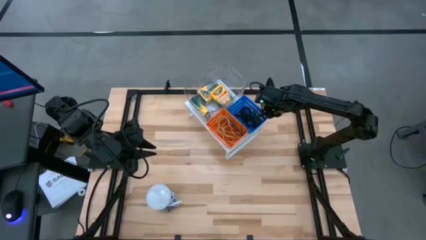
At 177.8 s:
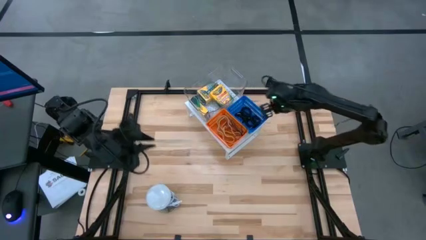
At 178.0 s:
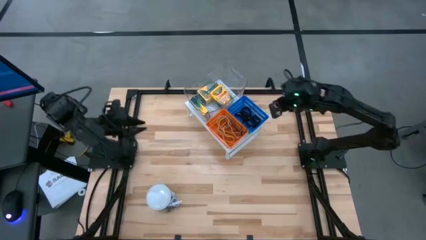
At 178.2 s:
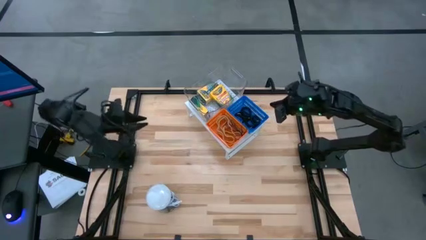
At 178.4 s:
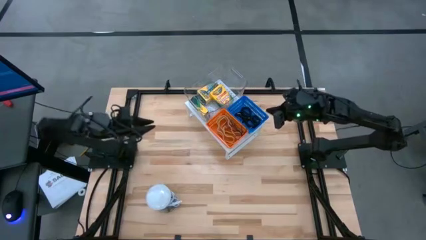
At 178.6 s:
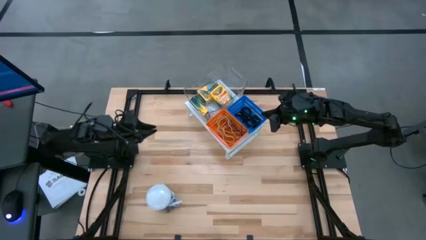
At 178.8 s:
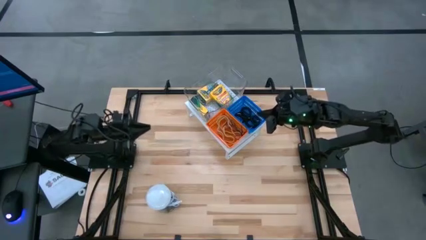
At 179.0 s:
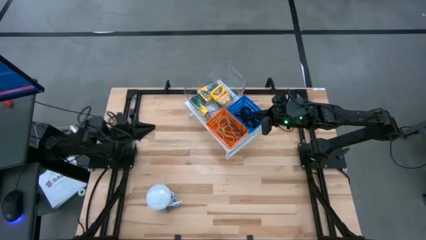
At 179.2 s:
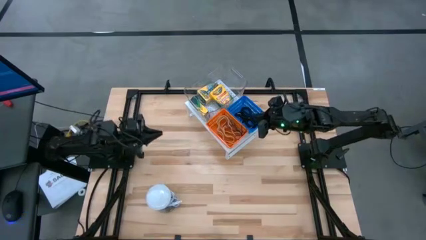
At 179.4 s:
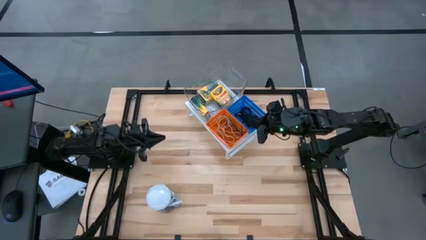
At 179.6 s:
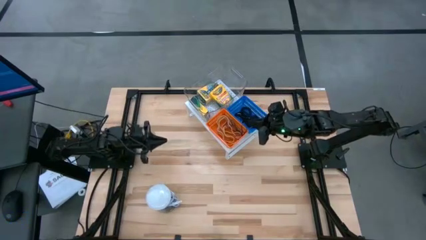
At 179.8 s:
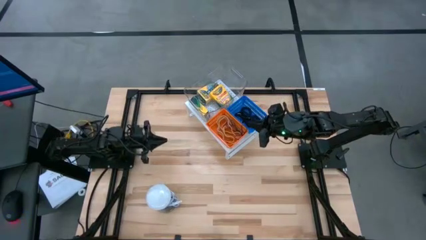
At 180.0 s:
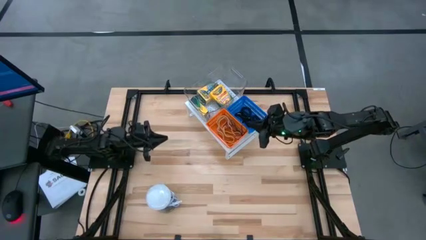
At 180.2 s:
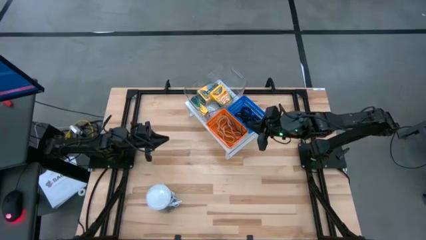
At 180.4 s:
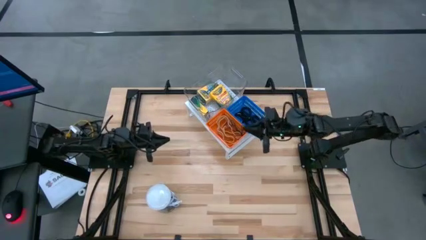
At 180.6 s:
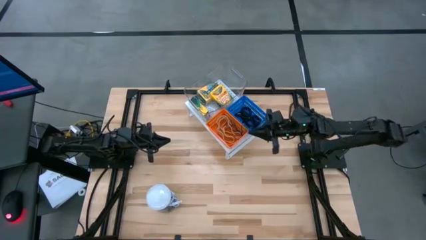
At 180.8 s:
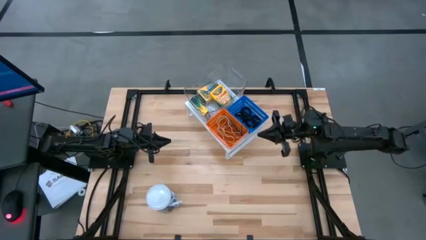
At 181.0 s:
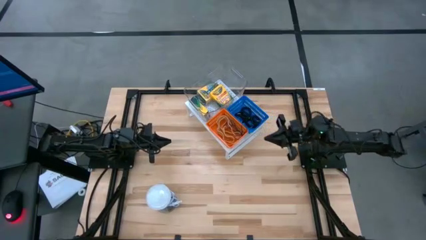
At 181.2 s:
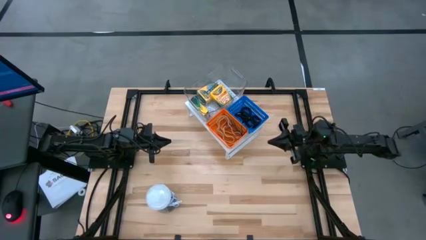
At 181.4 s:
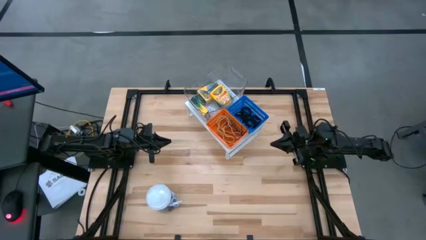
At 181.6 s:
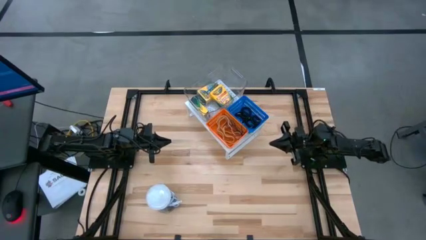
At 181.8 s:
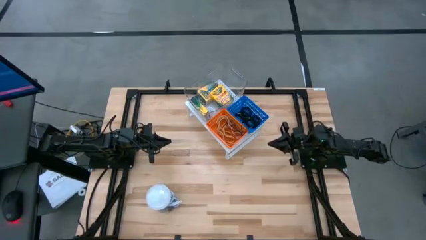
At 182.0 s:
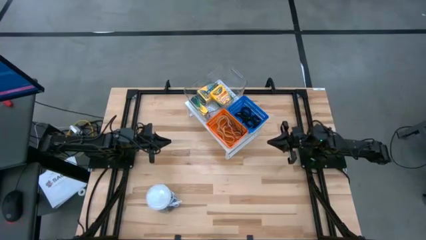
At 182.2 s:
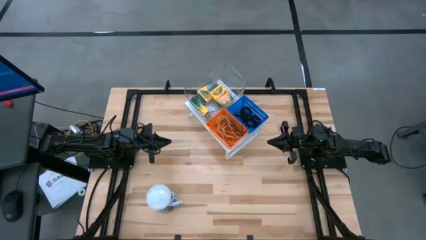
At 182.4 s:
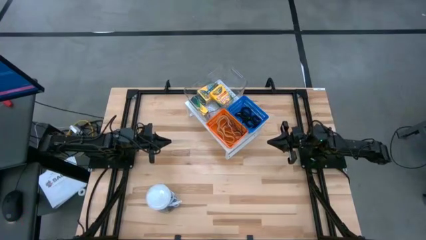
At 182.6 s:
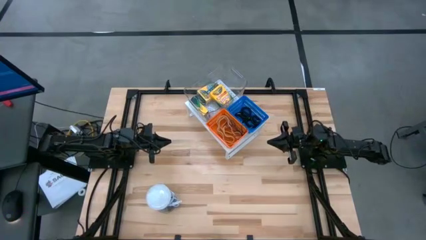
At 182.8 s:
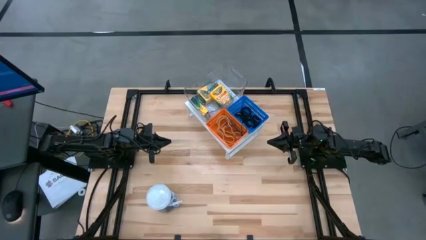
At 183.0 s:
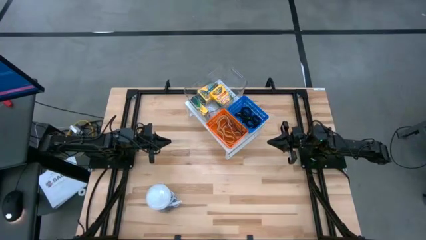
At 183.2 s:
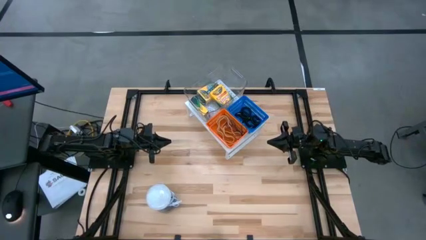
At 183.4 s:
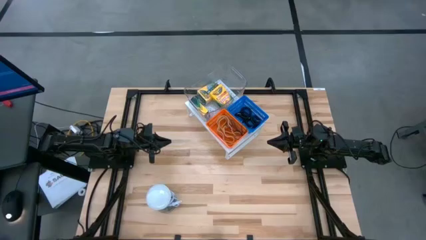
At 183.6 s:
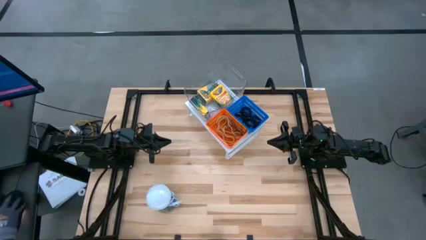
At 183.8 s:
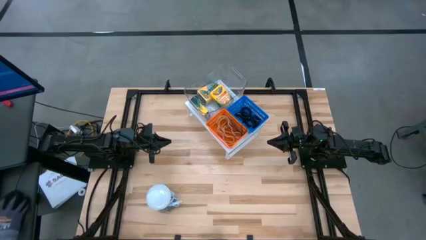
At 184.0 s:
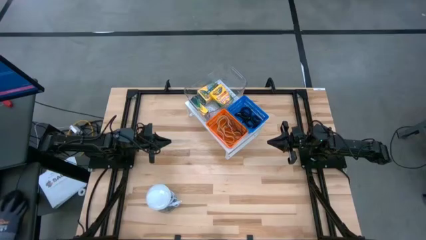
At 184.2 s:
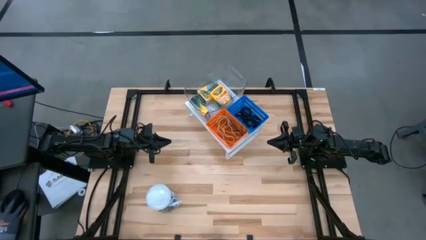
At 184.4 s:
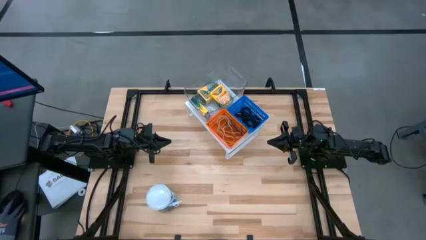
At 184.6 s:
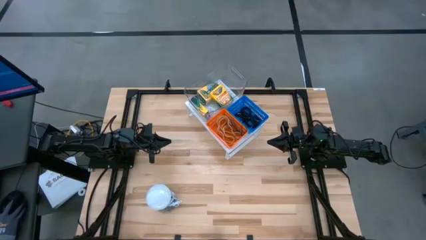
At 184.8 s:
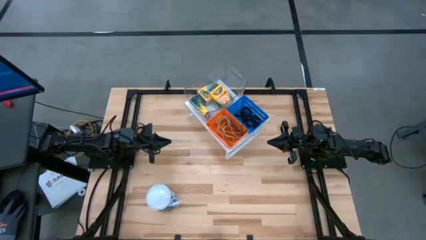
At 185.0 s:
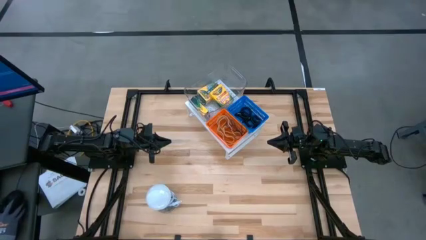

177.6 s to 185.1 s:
Task: Pick & Place Office Desk Supplies
Return to Home Position

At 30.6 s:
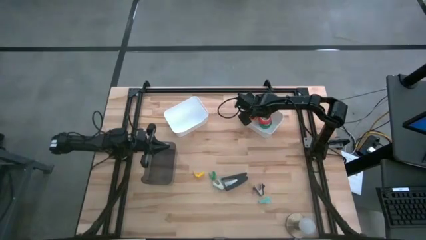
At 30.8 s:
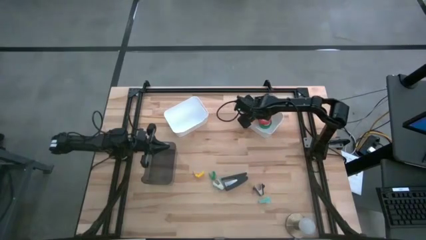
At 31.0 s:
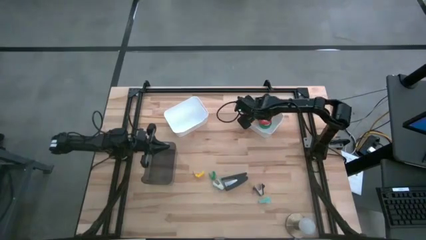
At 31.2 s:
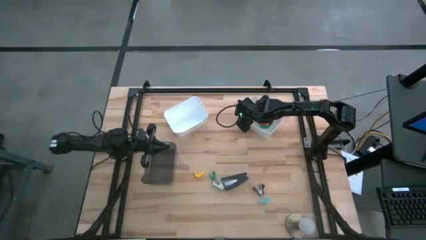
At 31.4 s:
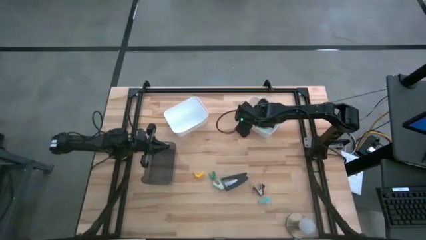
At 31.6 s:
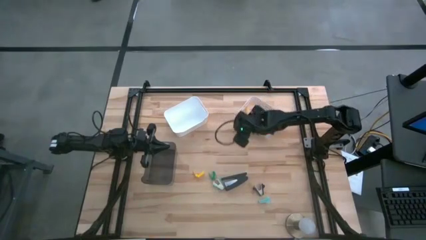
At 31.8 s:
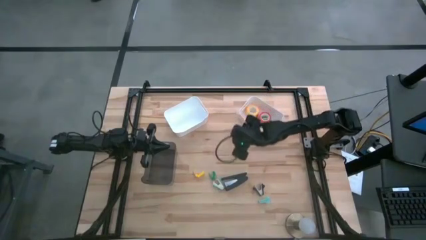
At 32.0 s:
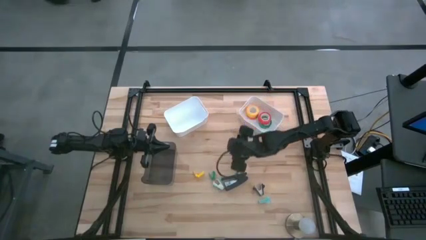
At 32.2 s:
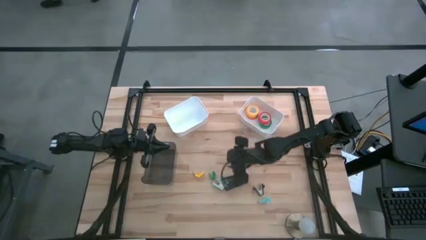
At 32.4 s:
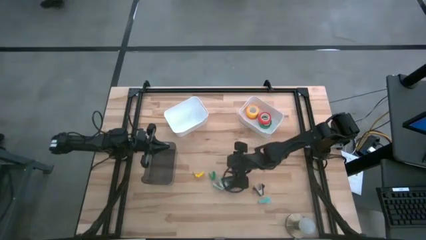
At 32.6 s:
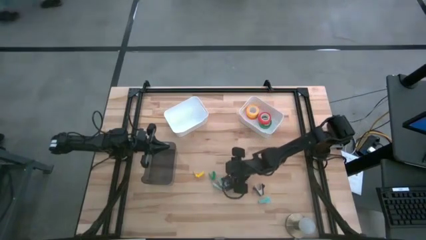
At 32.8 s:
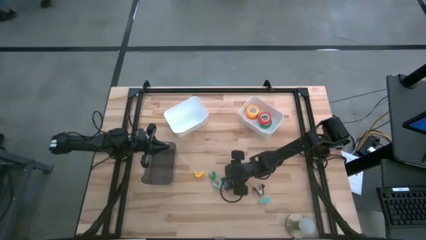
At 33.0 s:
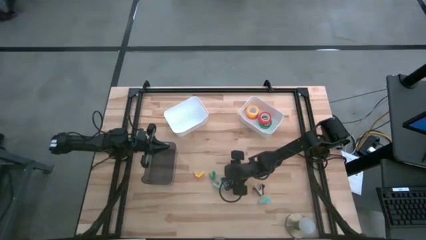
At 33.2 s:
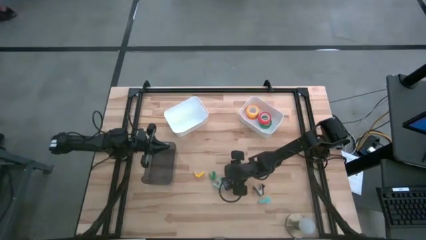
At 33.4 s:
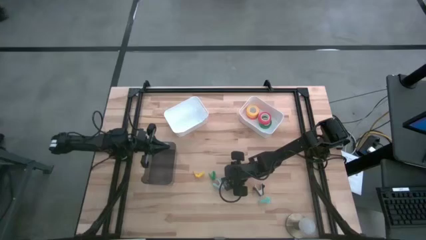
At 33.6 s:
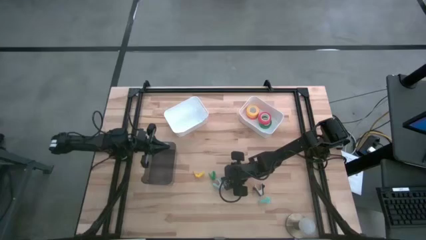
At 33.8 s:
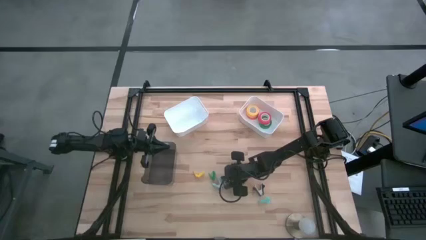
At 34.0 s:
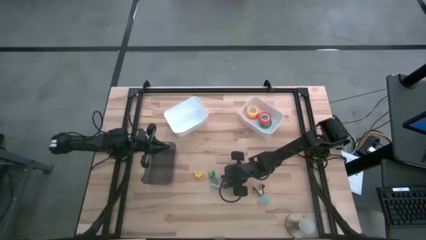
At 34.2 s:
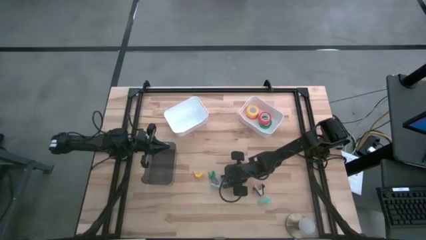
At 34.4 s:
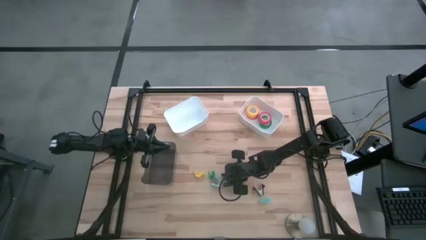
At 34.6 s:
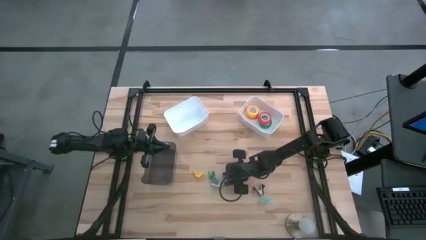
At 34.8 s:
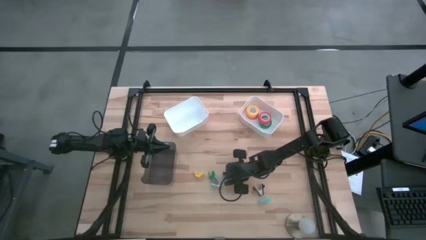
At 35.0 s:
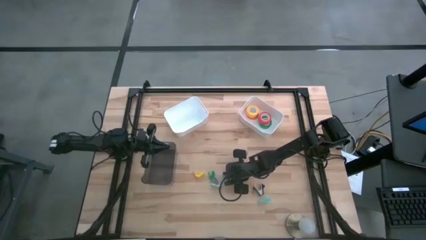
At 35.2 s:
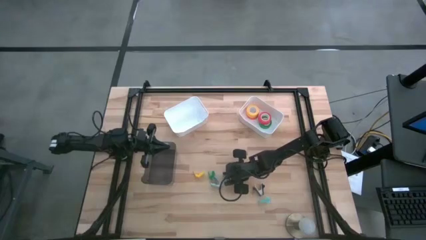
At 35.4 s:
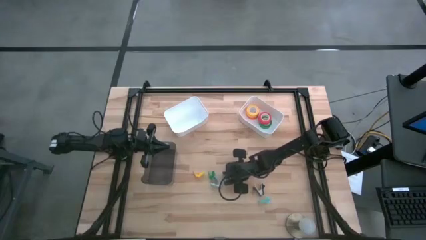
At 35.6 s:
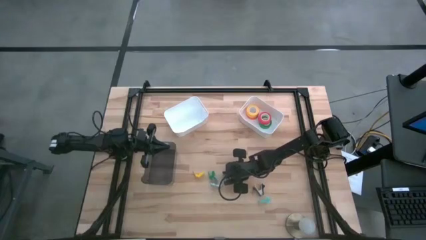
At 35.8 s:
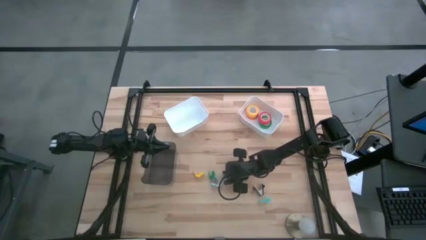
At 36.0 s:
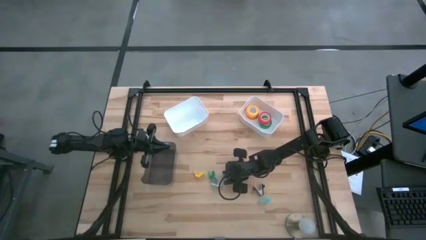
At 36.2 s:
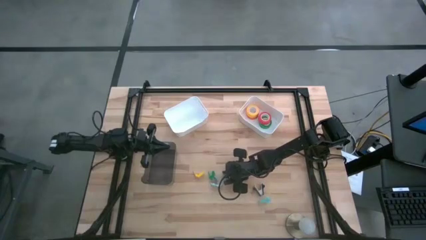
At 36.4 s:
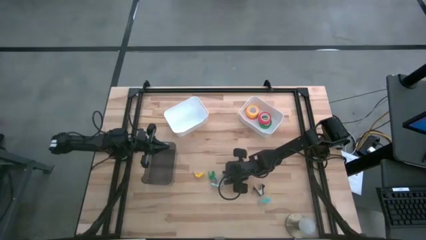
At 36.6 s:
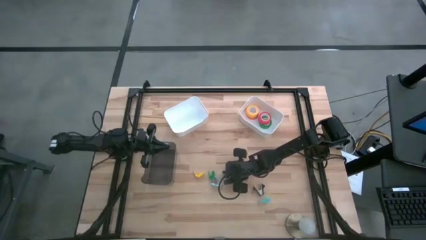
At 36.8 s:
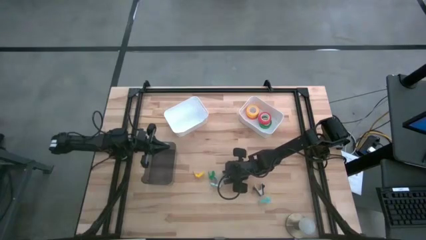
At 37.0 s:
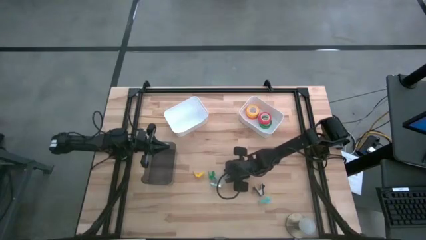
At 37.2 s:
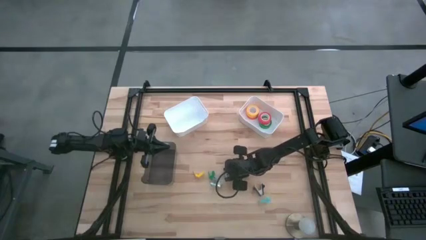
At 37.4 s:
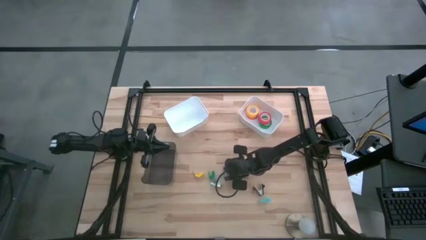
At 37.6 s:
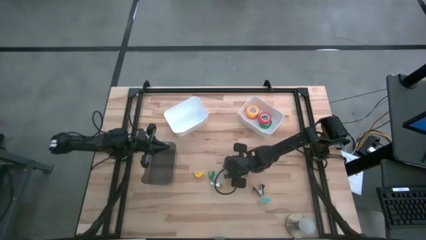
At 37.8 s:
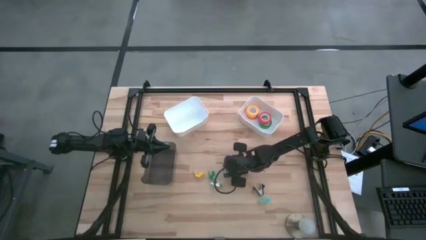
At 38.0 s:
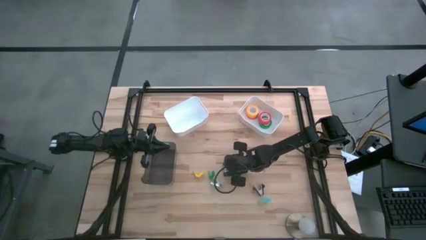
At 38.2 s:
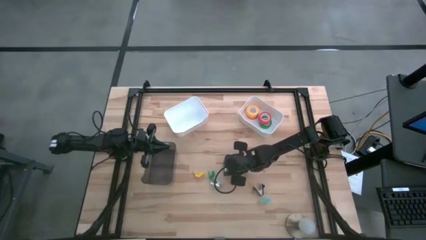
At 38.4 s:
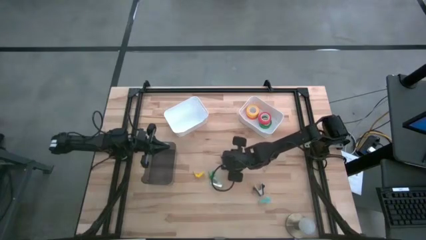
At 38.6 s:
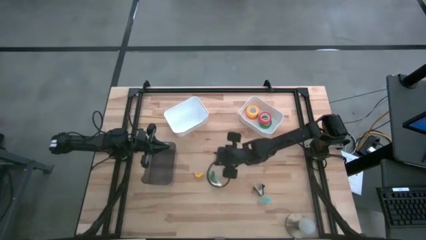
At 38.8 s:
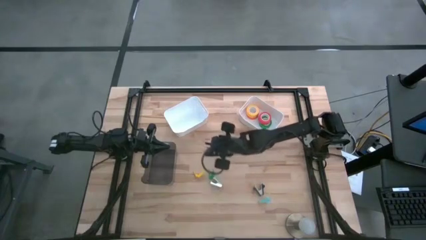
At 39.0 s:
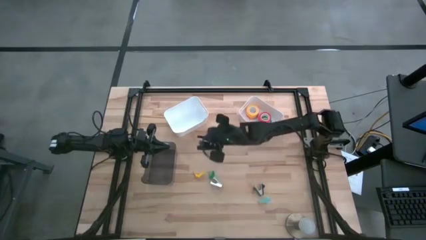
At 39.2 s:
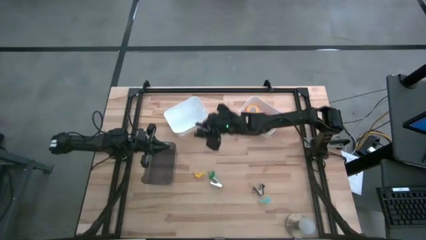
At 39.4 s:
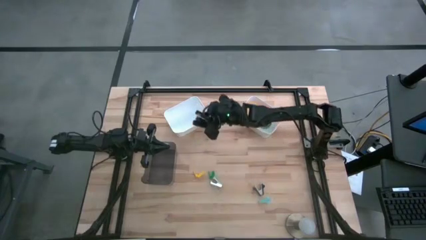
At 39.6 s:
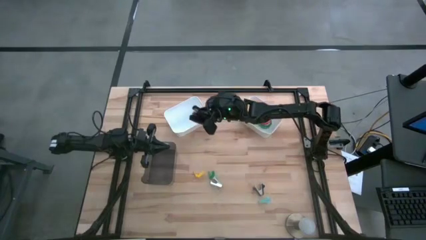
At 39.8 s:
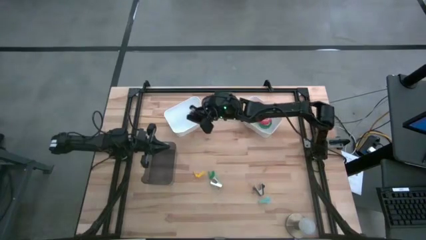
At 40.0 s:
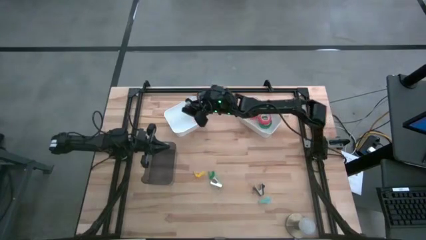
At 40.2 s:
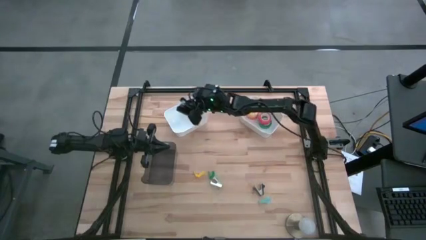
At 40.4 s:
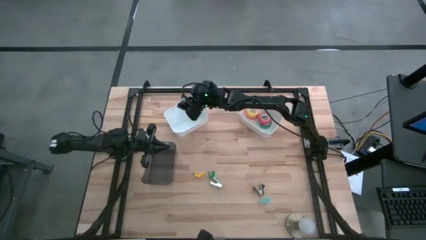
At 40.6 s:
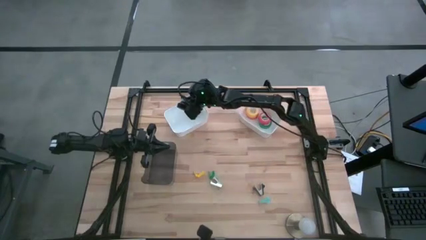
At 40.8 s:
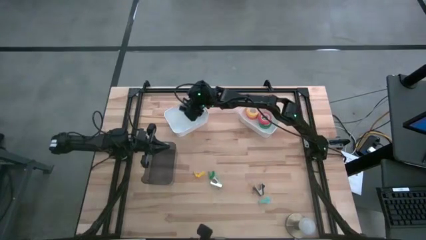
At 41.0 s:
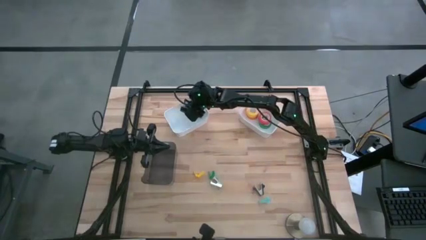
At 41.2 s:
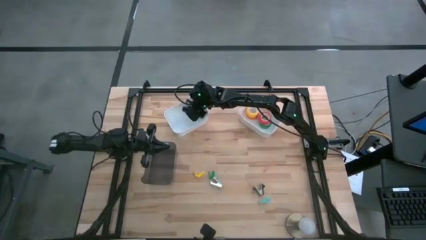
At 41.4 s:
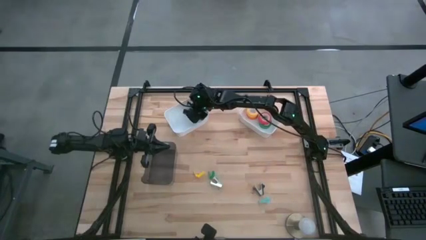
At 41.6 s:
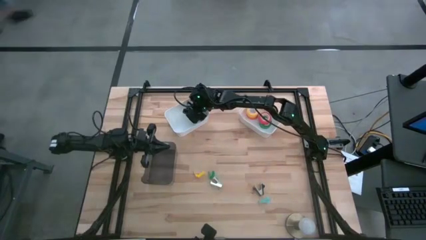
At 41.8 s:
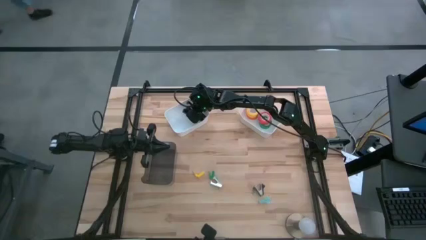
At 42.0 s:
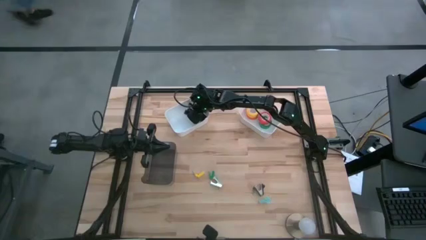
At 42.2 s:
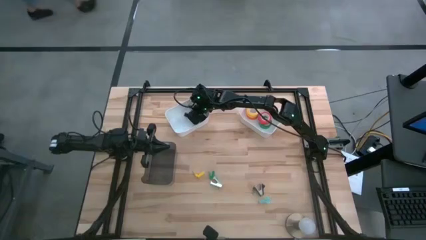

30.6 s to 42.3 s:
Task: Pick and place Stapler, Stapler remover, tape
Put the black stapler into the left white bin
